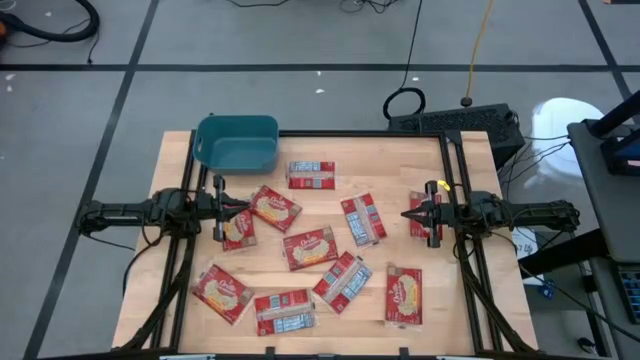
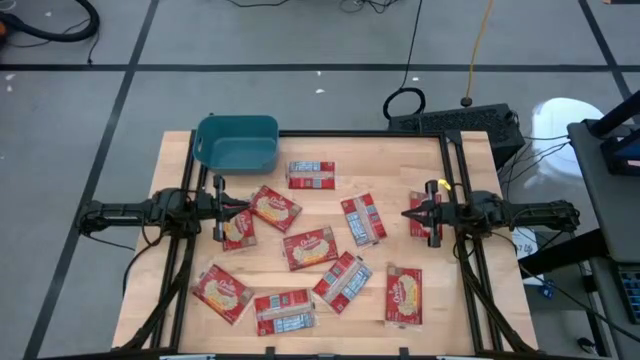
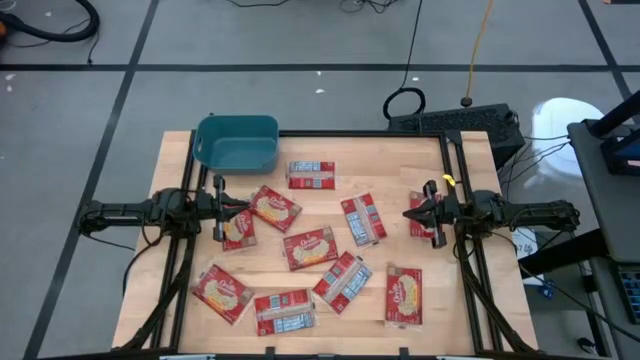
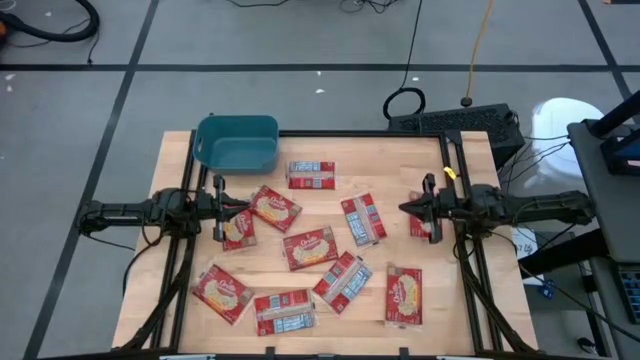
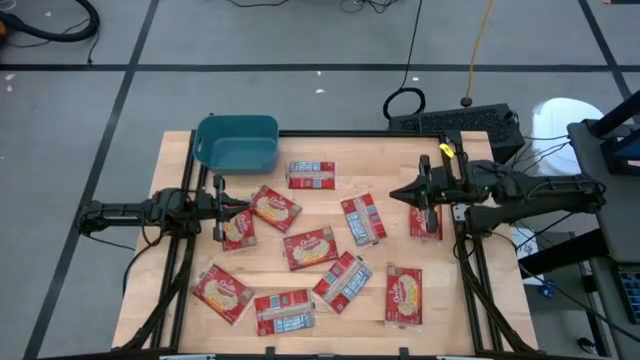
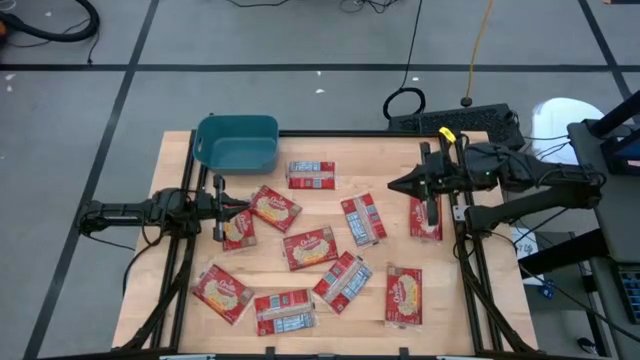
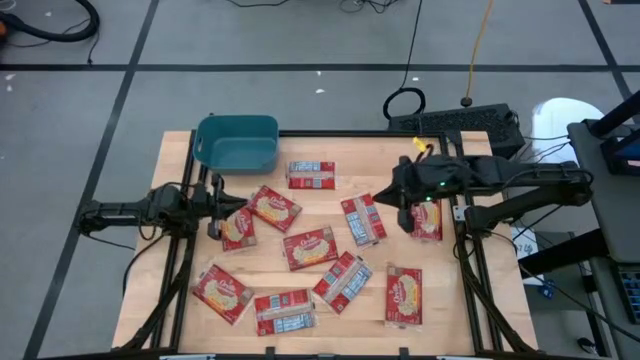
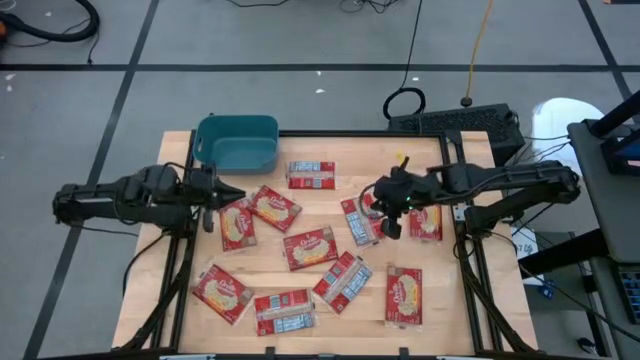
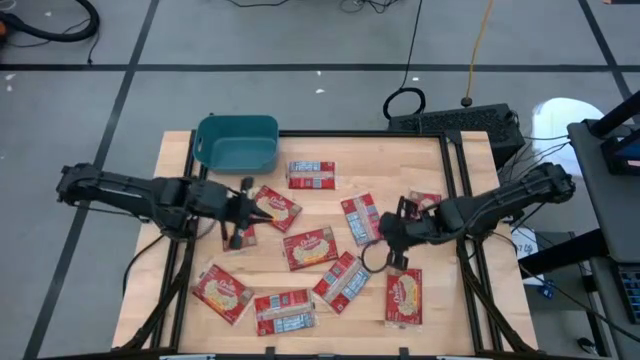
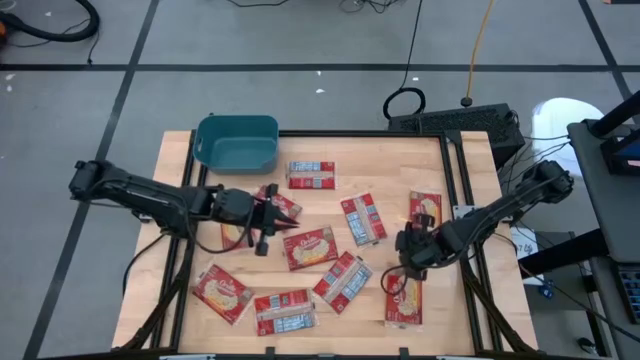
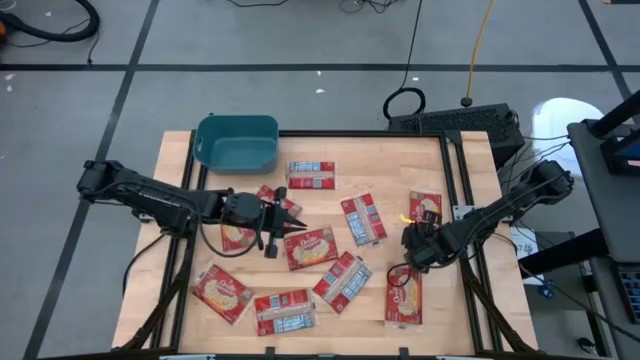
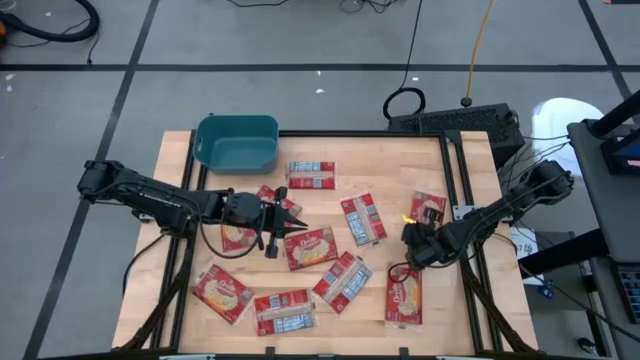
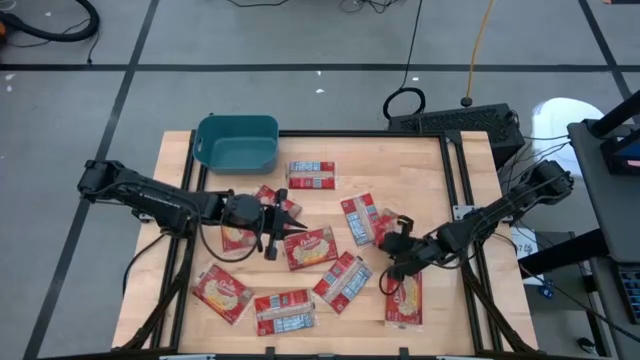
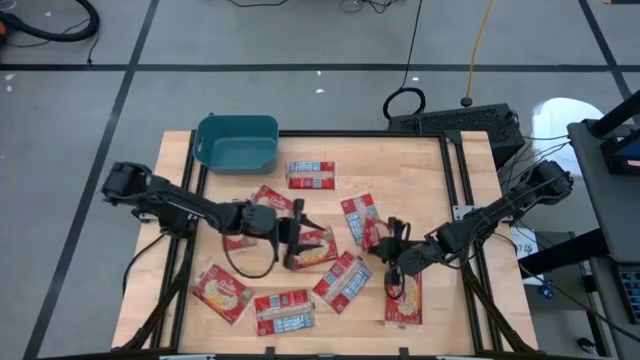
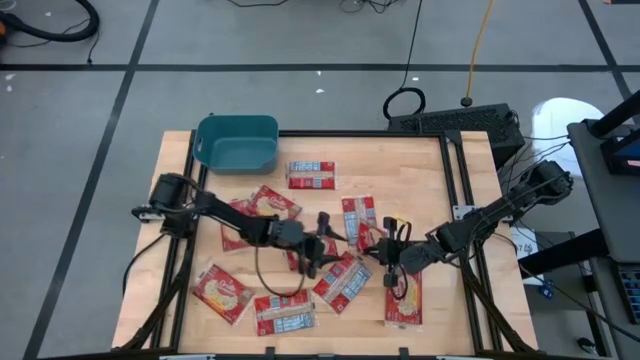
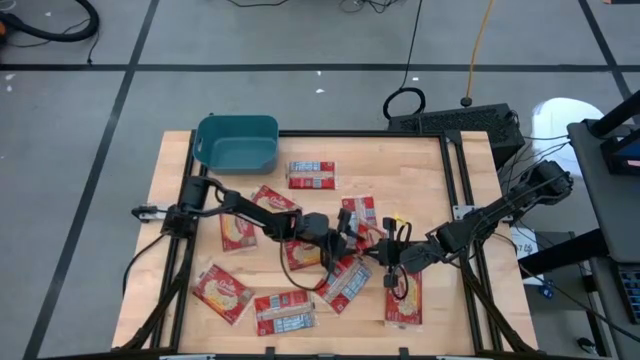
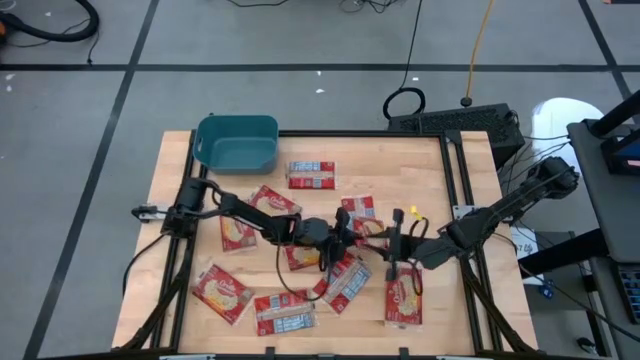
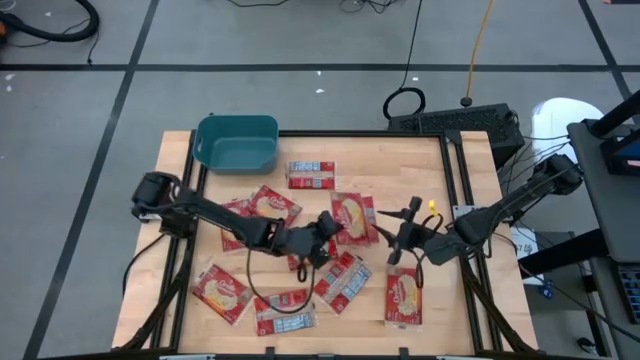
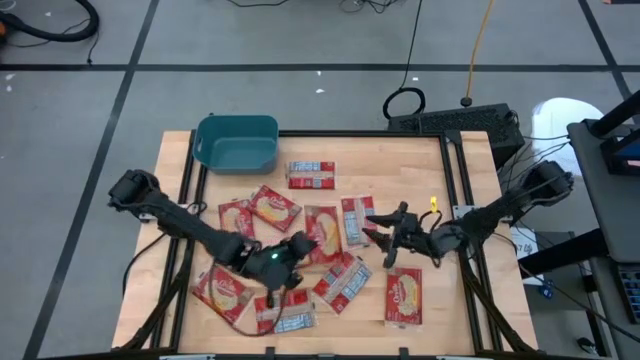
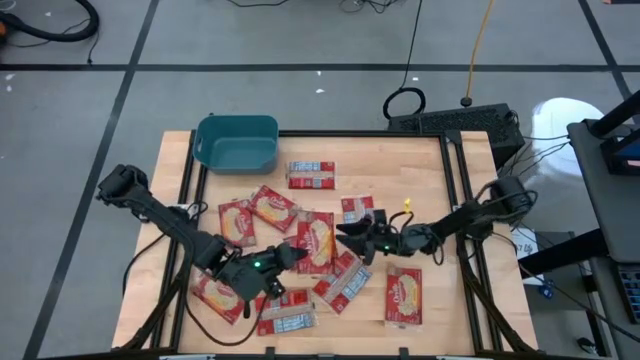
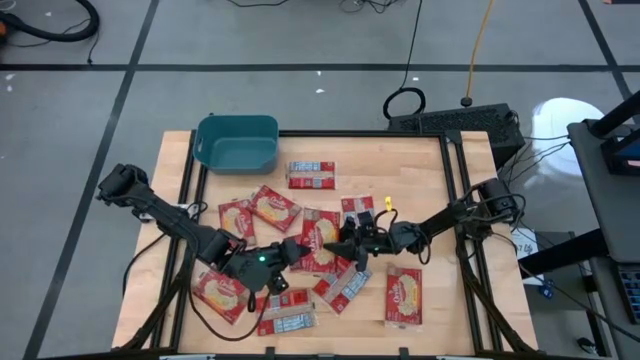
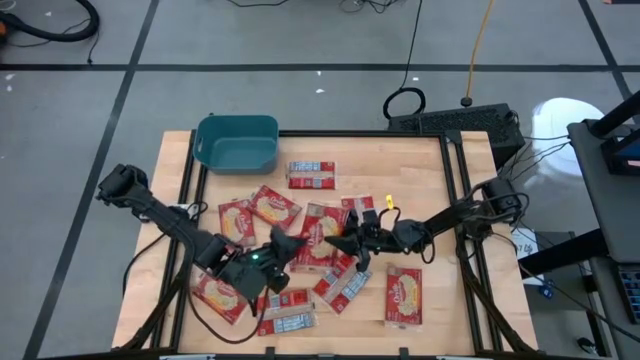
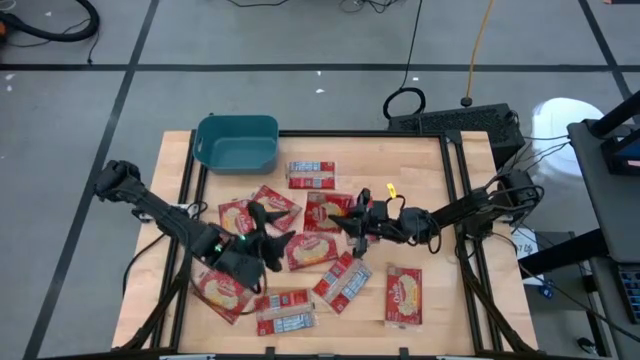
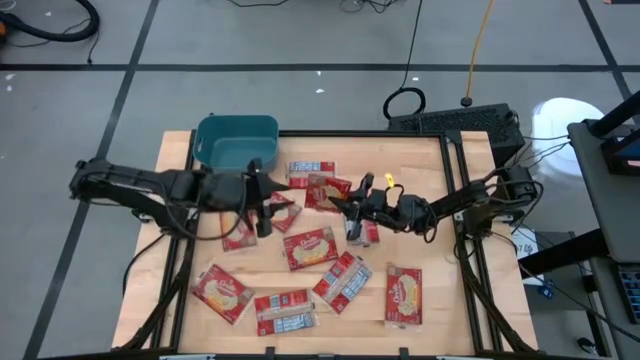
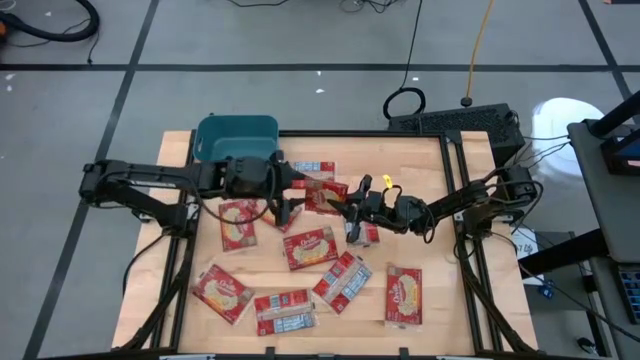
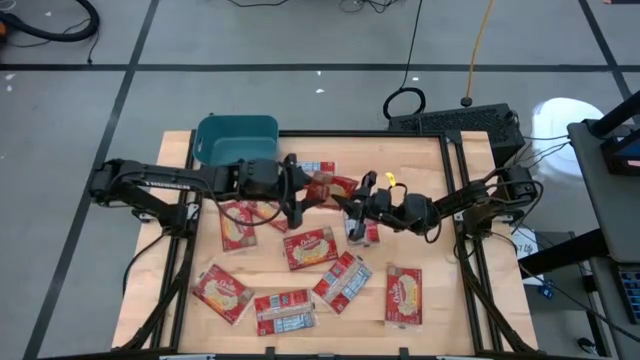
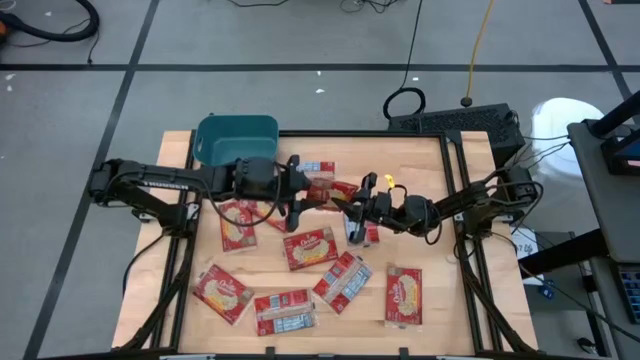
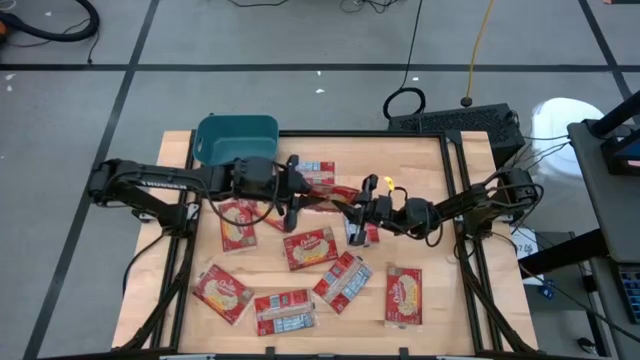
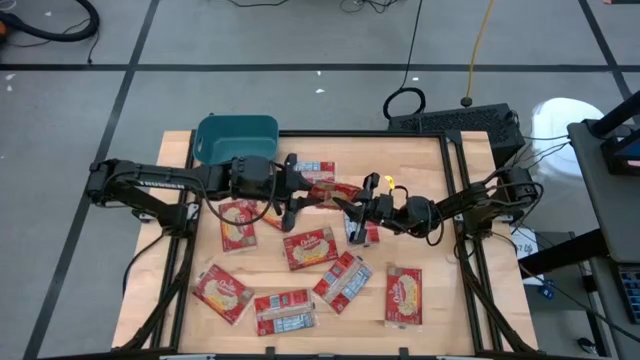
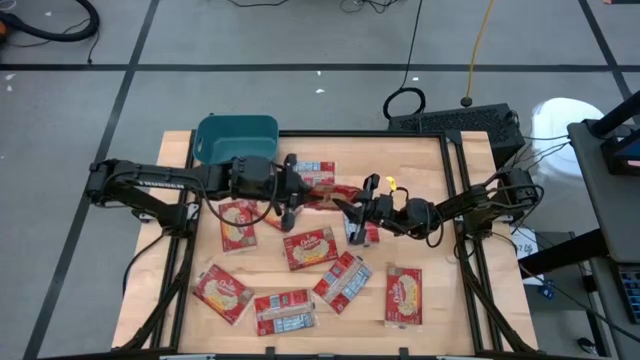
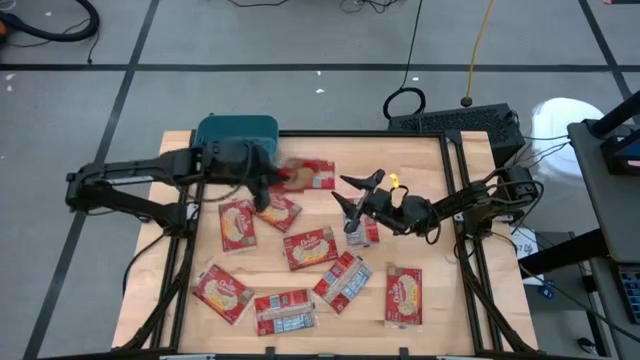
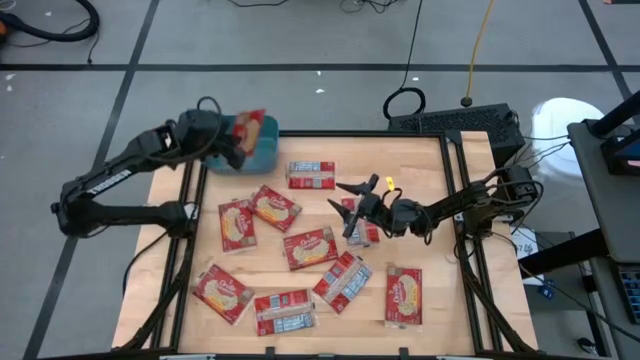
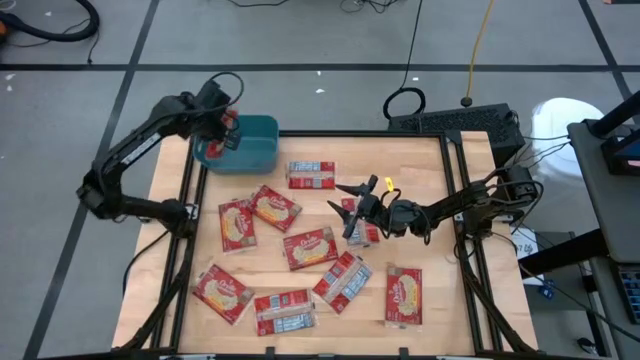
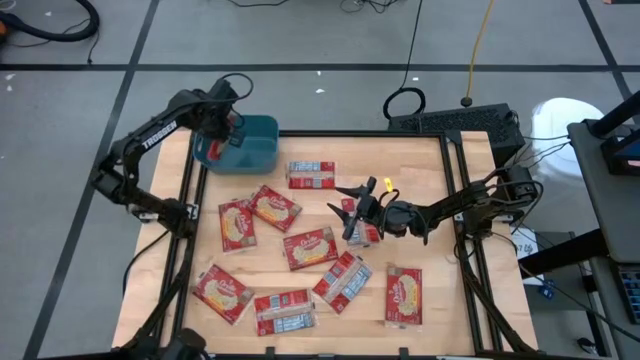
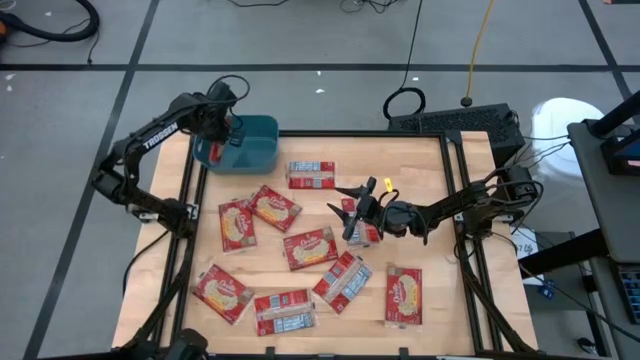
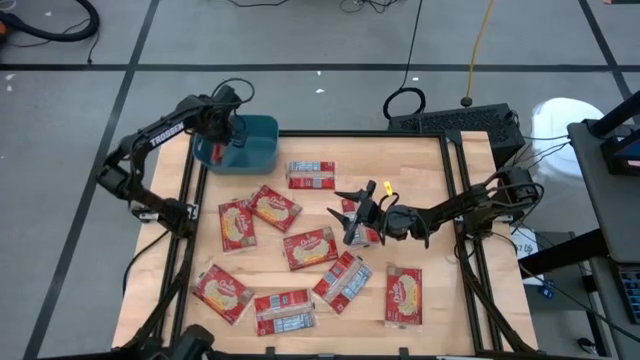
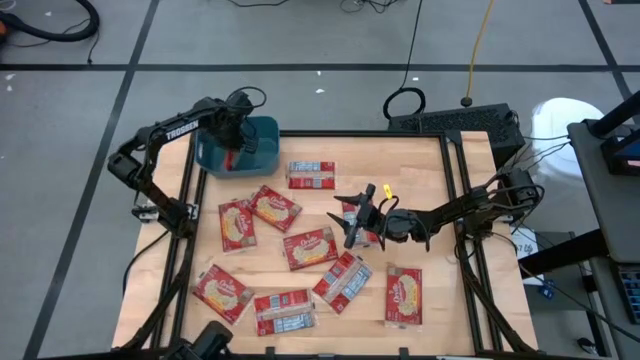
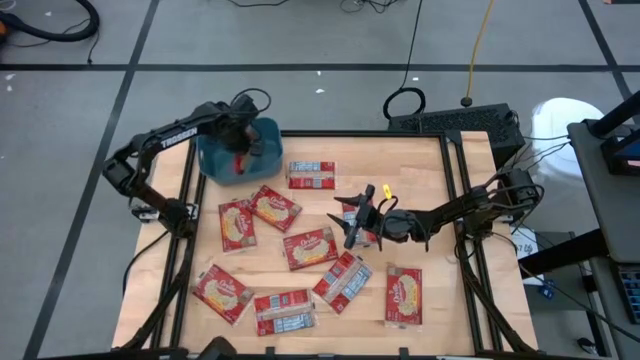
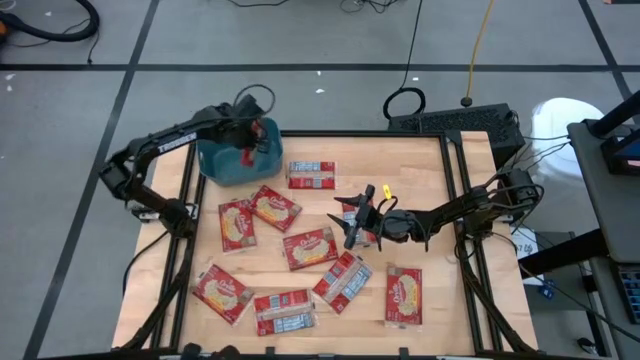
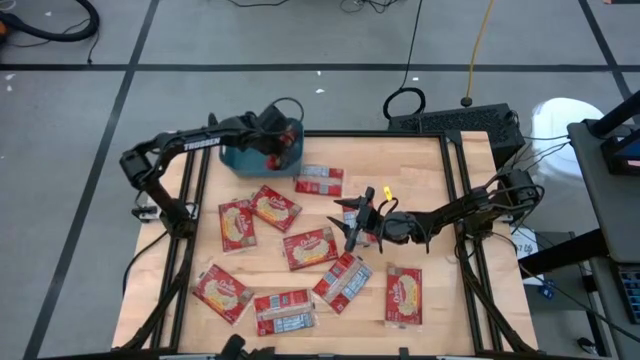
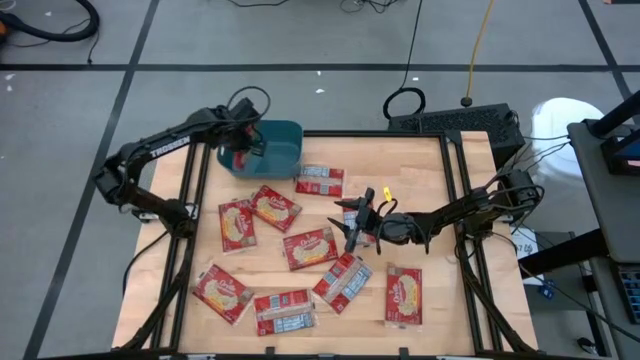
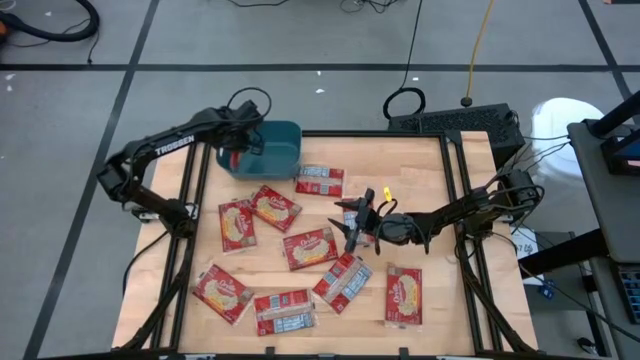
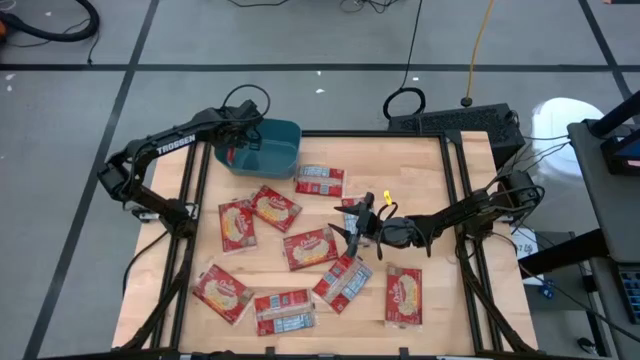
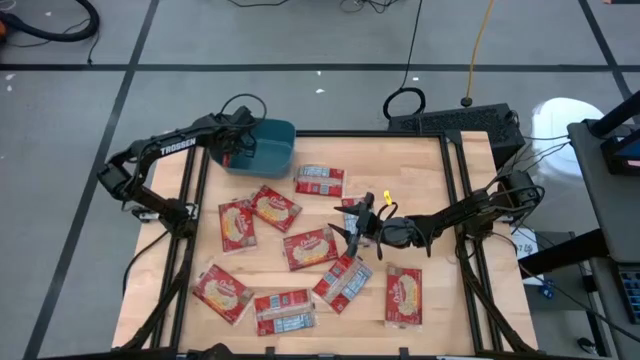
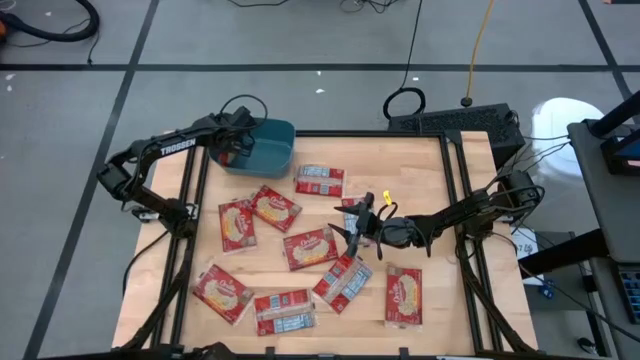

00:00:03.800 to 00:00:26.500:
Task: Sort popcorn bags into baskets
Put the red popcorn bag into the blue bin
